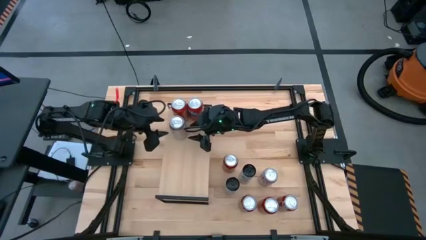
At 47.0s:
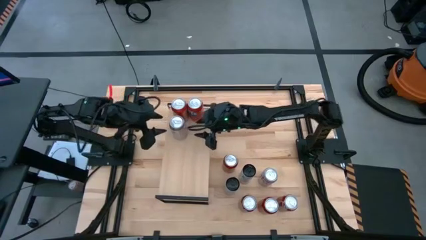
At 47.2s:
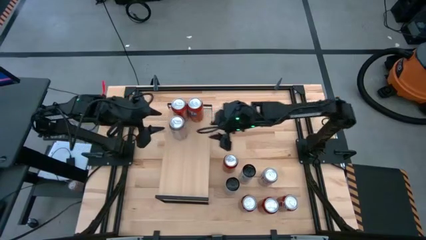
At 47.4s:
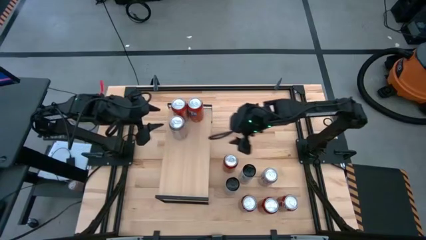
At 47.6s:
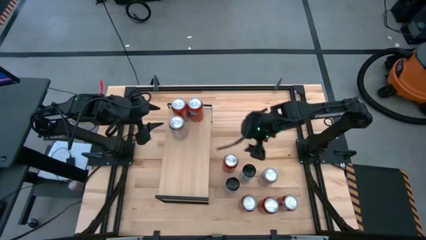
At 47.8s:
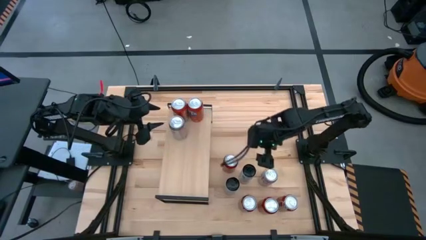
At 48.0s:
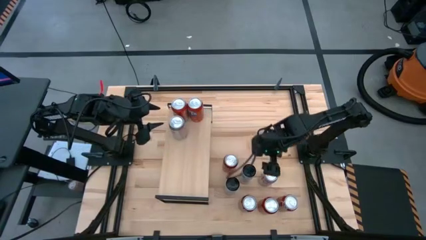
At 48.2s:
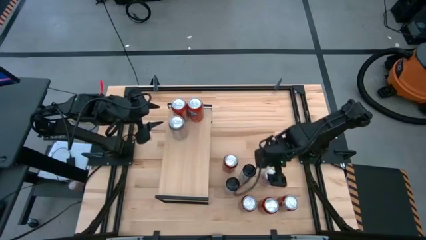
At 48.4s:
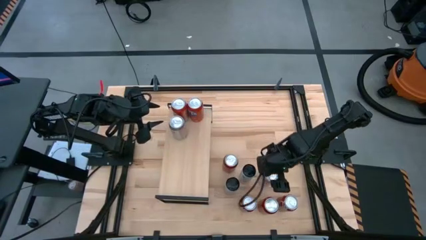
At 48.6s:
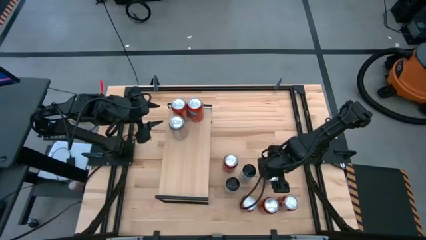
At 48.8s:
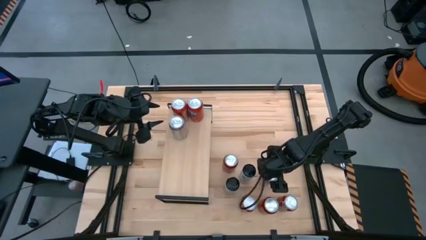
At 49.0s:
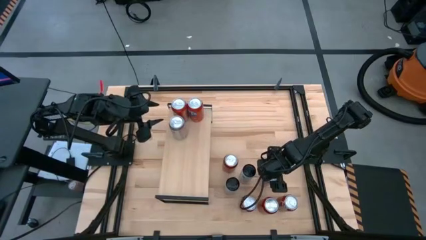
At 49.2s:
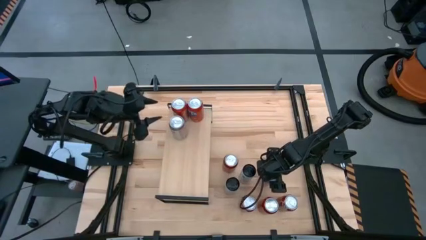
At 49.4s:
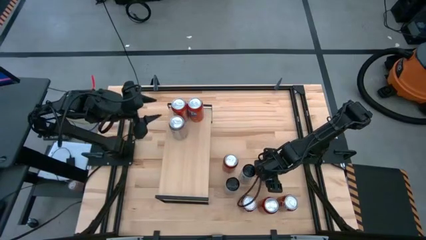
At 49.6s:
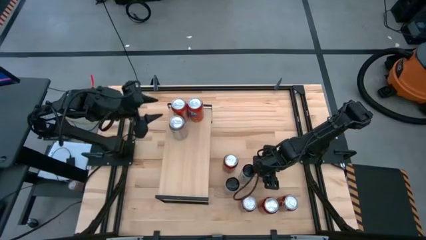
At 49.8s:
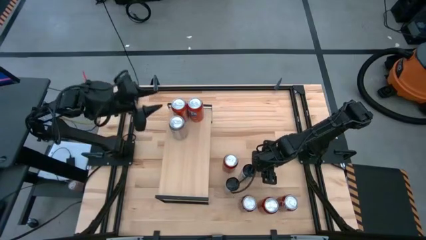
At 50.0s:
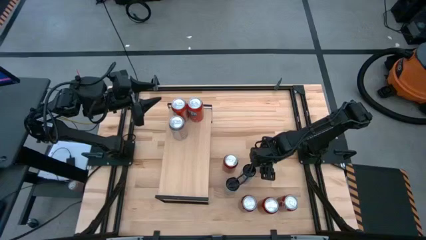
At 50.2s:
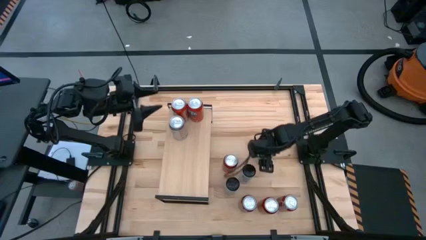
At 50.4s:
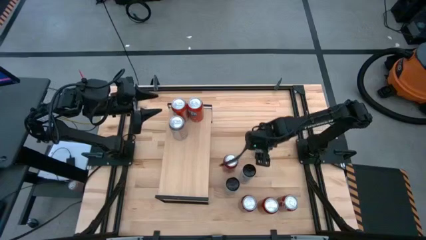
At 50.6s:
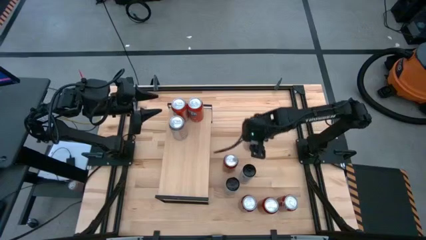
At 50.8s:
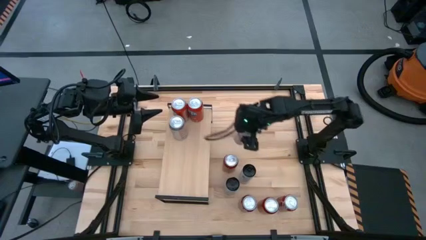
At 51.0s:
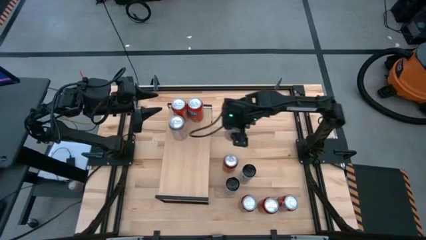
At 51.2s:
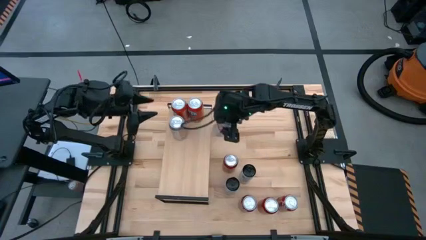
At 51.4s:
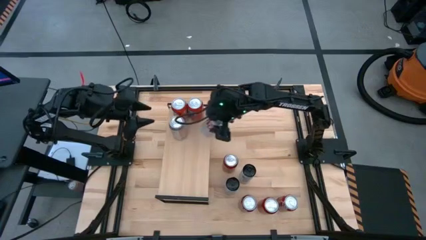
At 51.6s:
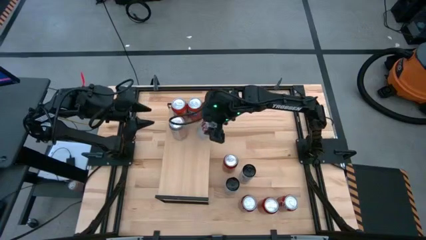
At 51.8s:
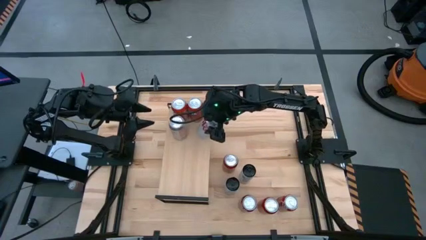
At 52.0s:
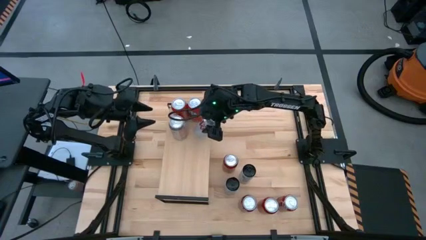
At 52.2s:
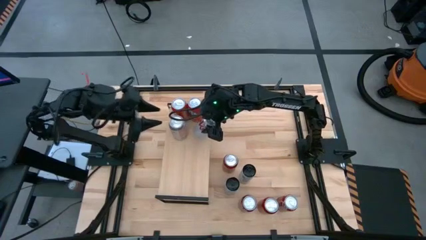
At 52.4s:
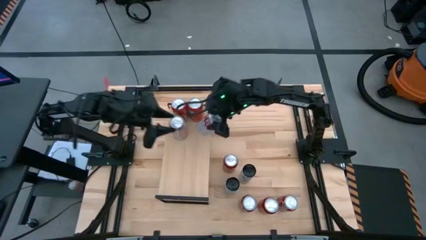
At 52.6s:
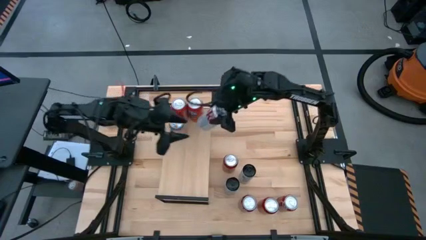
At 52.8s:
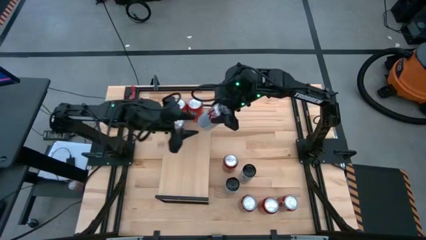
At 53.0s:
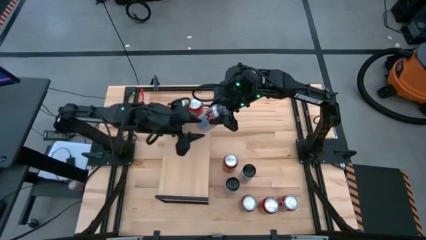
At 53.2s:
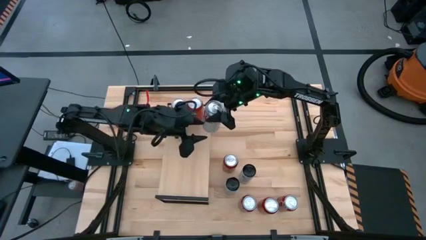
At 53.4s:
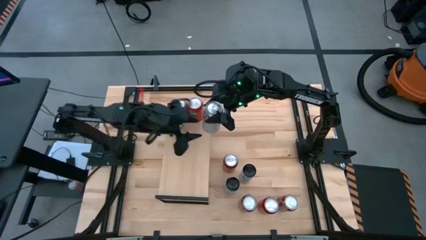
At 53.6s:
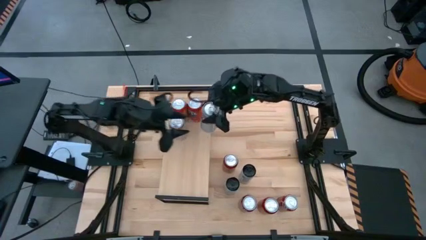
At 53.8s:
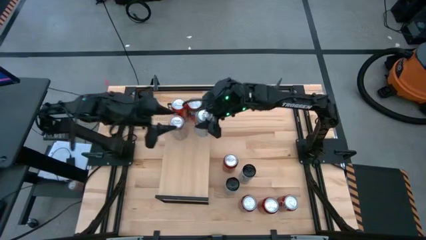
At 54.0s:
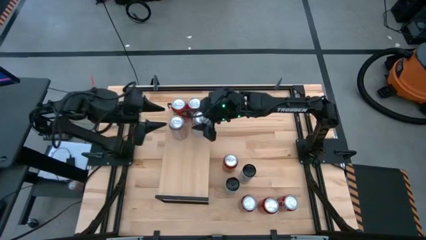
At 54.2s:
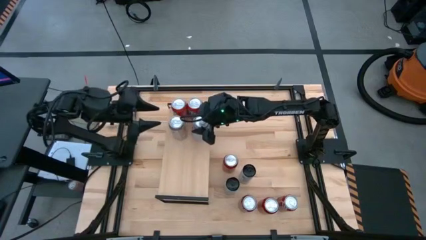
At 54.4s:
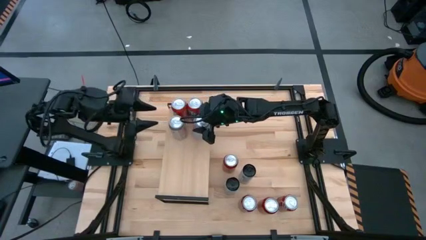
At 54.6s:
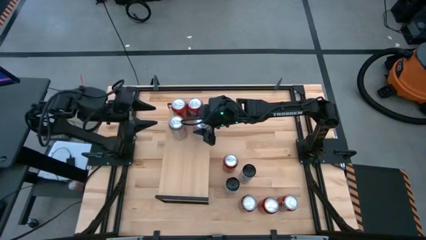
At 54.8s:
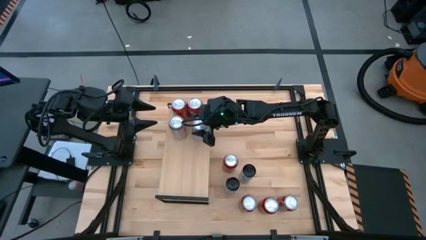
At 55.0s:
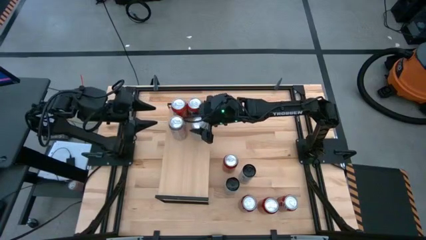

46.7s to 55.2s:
Task: Pick and place cans onto a shelf
Put the red-silver soda can on the shelf aligned with the other red-silver soda can

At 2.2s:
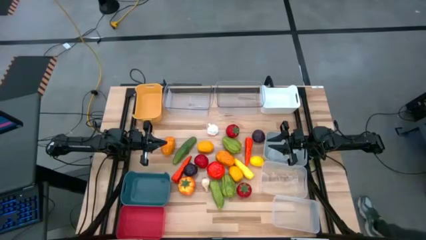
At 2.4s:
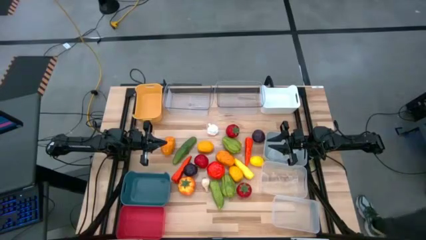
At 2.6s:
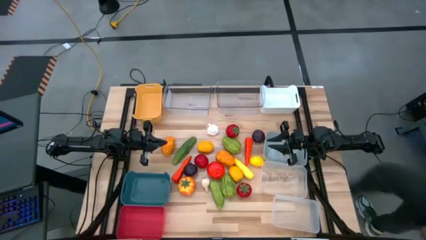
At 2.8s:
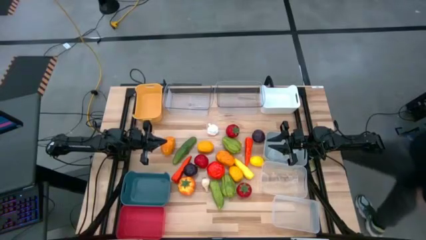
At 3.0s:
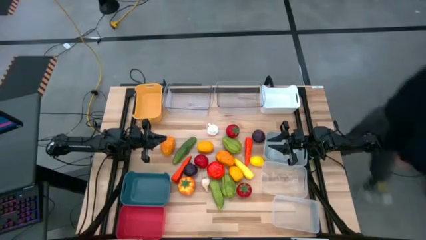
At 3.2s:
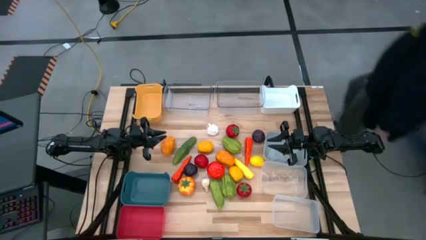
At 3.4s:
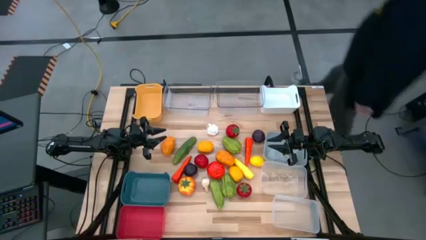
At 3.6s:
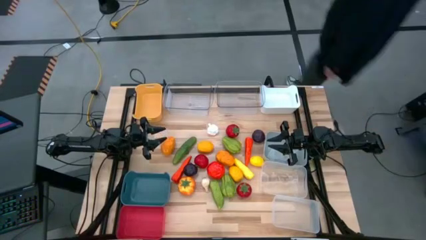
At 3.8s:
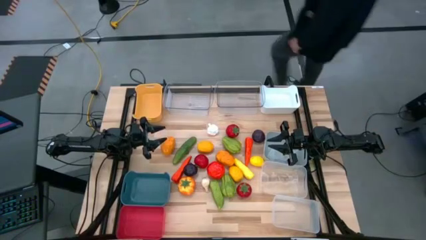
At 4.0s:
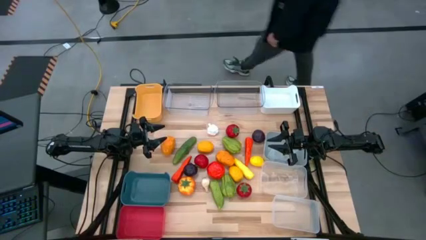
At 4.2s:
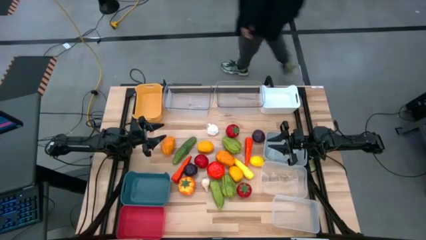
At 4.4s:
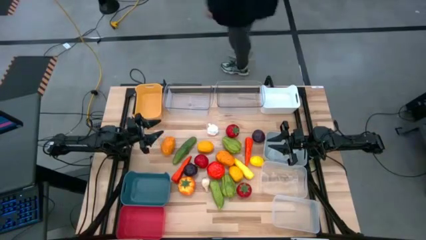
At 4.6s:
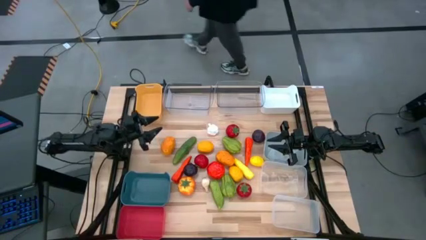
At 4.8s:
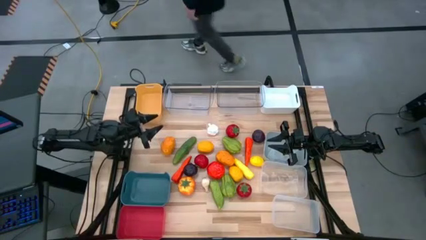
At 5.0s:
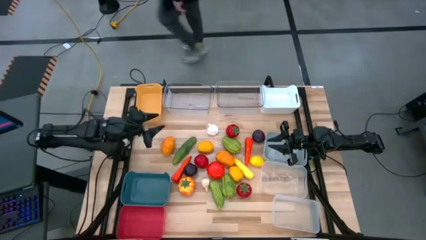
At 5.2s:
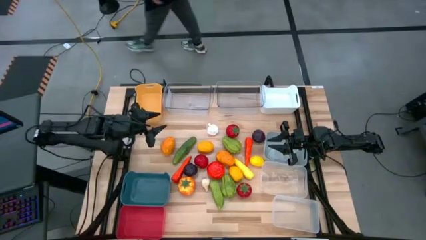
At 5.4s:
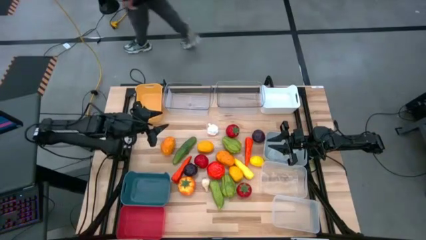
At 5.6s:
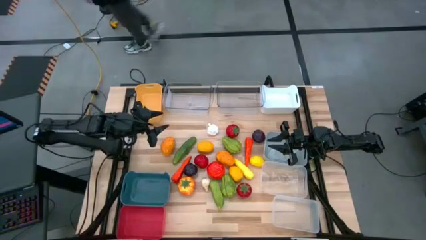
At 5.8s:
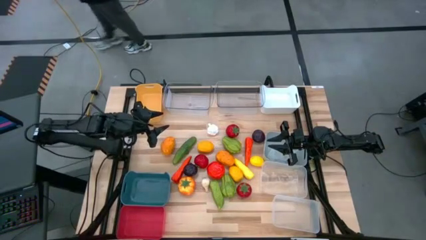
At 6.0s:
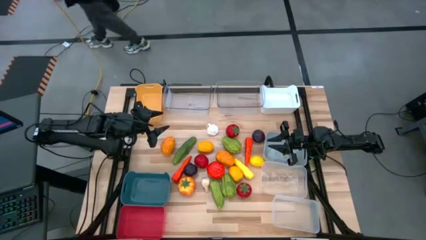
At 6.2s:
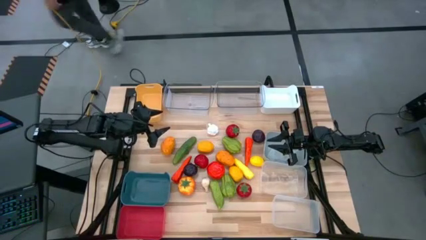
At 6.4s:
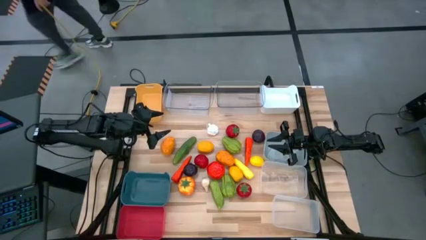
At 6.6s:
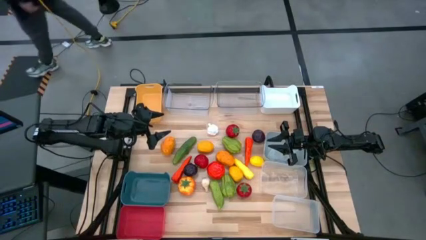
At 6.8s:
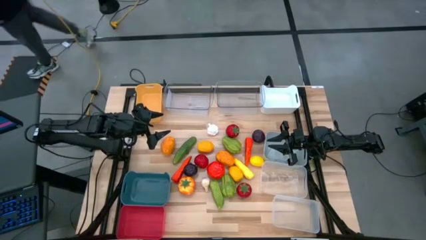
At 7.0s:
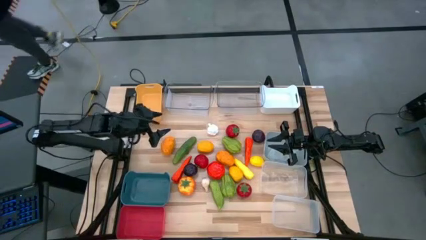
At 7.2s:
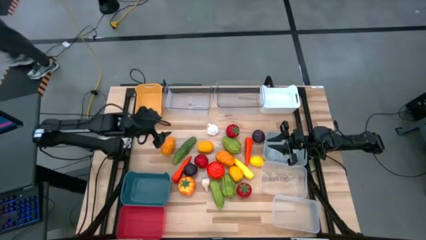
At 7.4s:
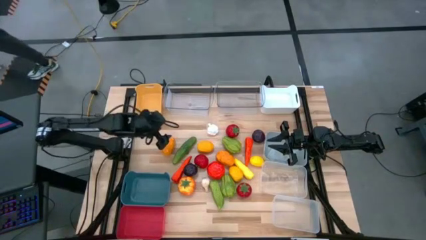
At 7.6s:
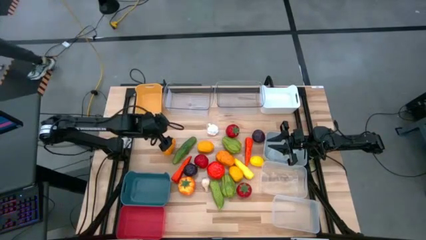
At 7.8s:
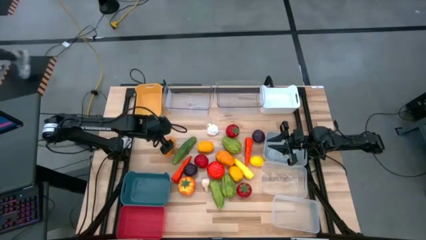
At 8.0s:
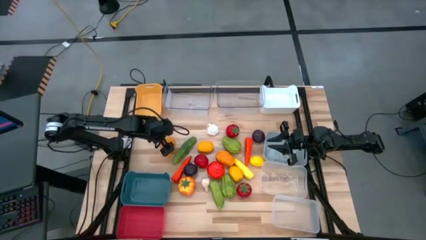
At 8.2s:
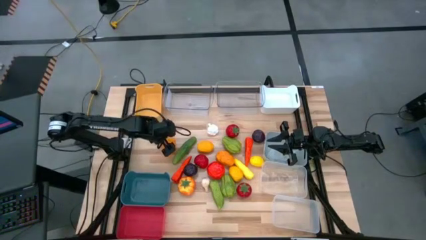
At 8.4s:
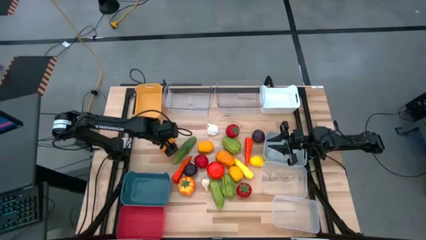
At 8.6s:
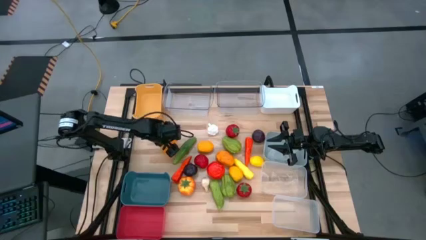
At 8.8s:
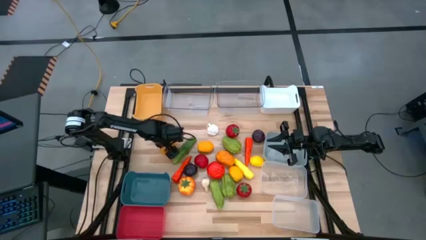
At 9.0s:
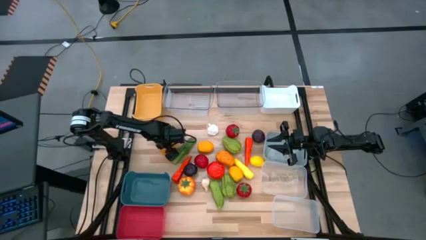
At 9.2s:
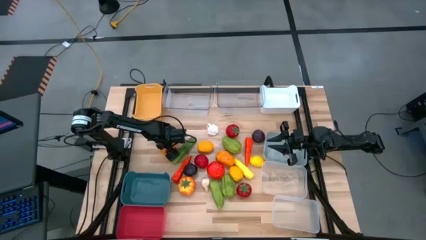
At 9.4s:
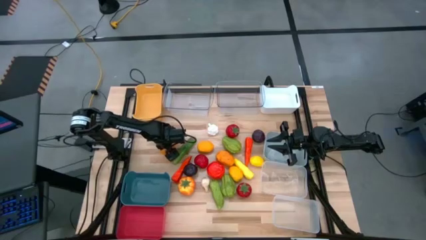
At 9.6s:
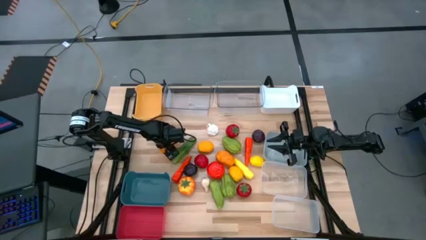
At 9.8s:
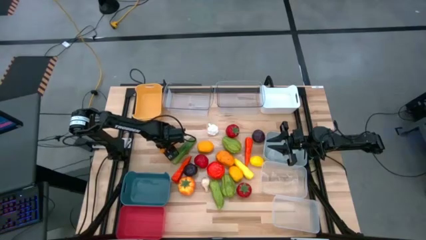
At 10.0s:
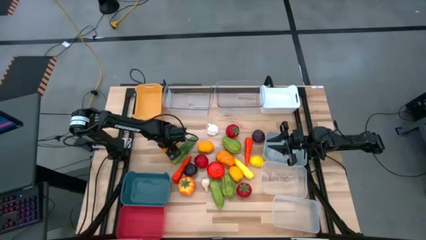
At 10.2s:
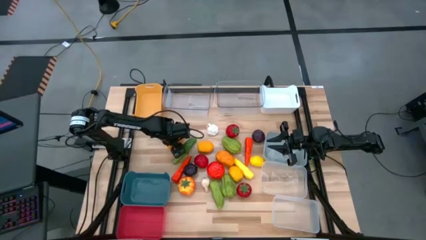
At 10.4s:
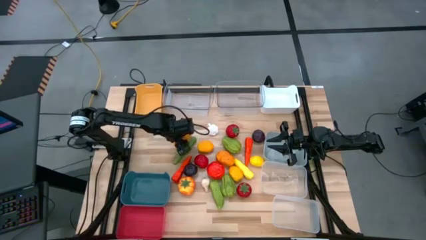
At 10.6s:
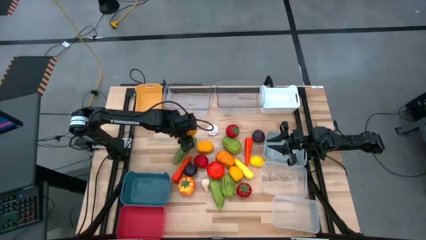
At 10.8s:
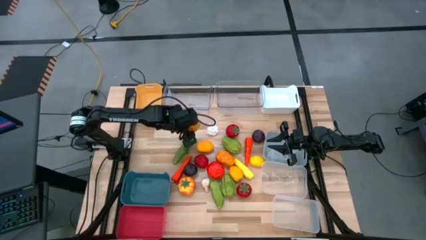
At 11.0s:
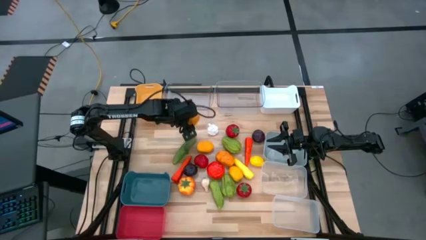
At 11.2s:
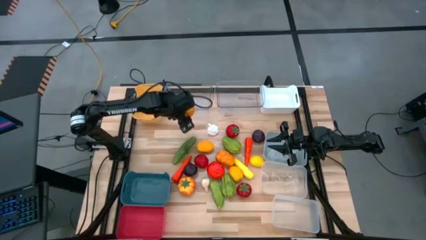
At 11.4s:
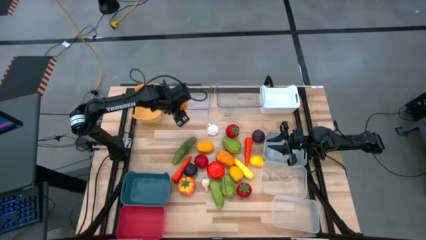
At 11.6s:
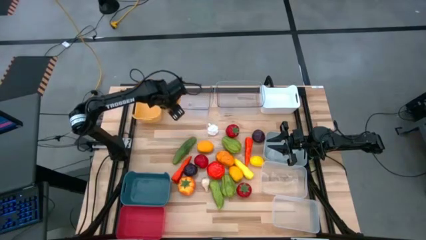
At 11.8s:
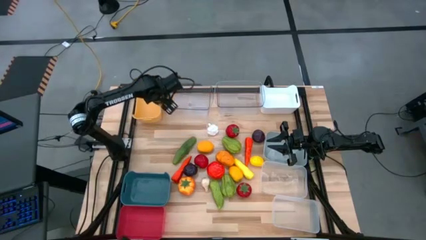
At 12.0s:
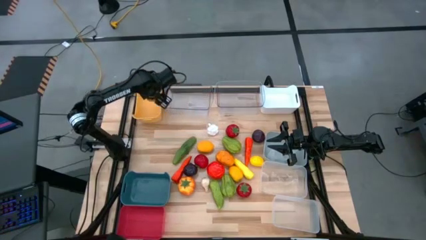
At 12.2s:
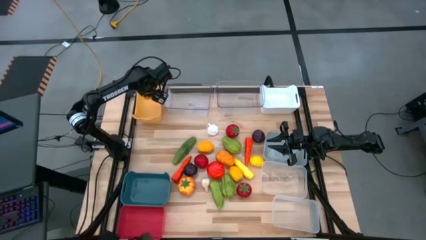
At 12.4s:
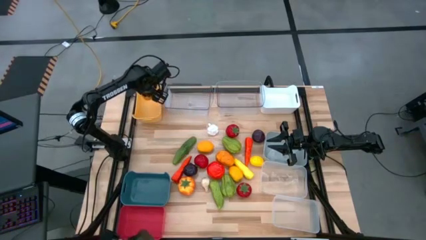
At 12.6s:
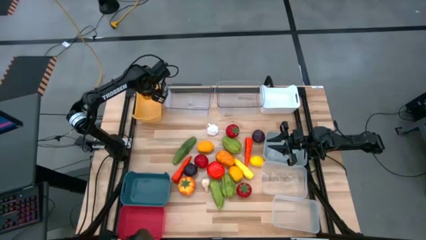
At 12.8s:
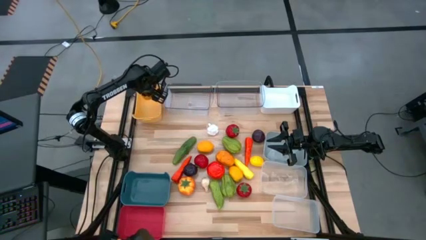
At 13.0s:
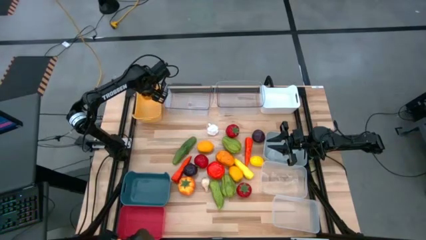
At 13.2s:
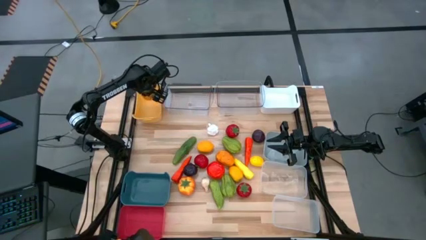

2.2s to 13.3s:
Task: Sort produce into baskets
Put the brown potato into the yellow bin
